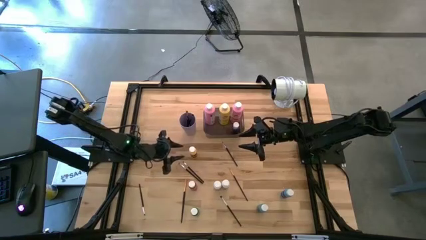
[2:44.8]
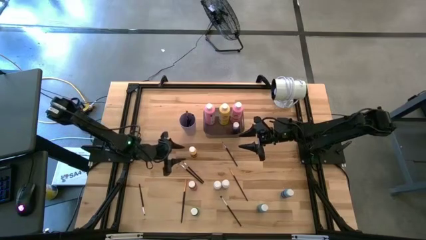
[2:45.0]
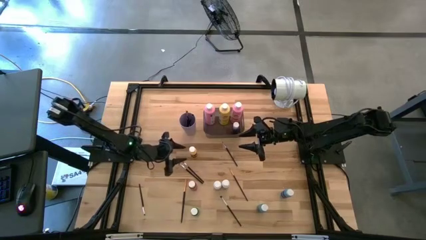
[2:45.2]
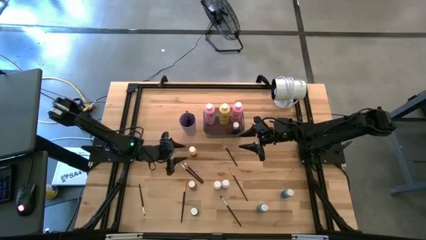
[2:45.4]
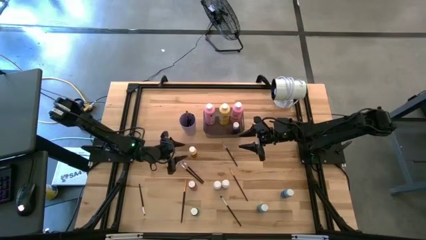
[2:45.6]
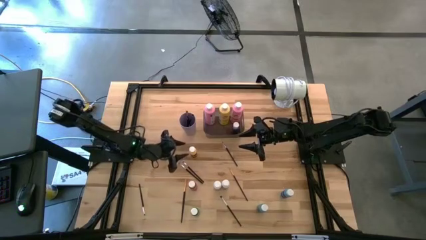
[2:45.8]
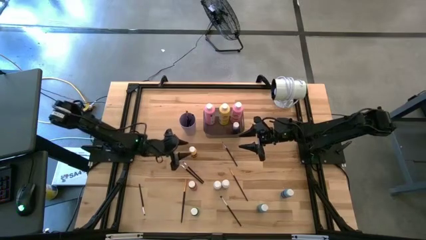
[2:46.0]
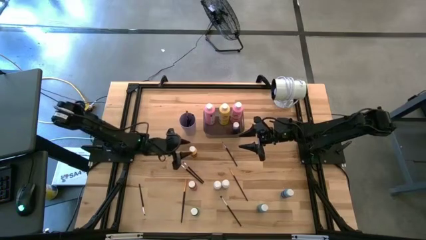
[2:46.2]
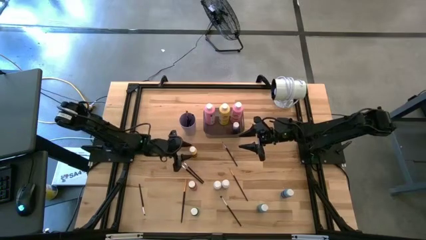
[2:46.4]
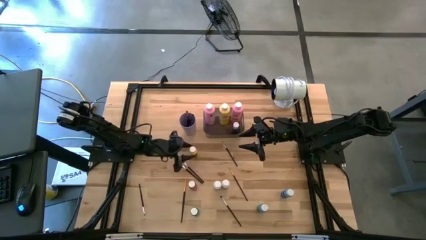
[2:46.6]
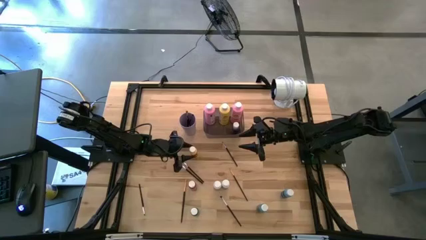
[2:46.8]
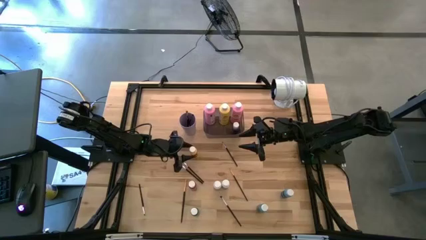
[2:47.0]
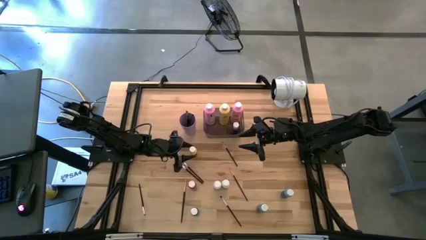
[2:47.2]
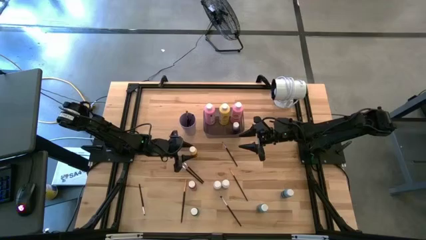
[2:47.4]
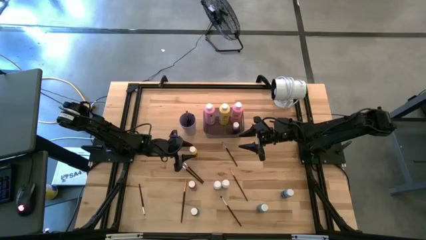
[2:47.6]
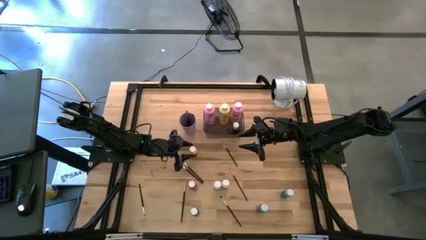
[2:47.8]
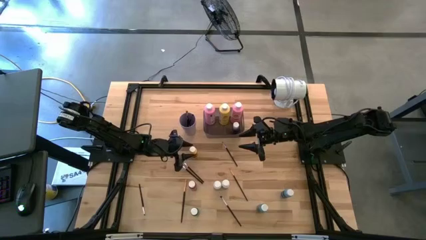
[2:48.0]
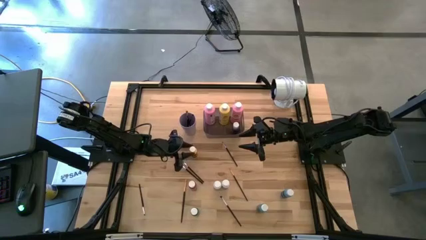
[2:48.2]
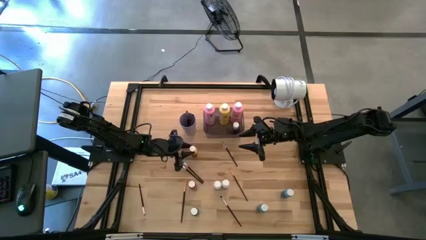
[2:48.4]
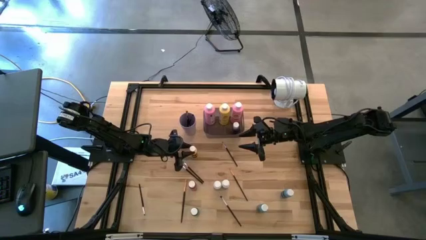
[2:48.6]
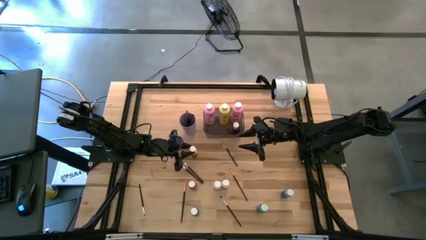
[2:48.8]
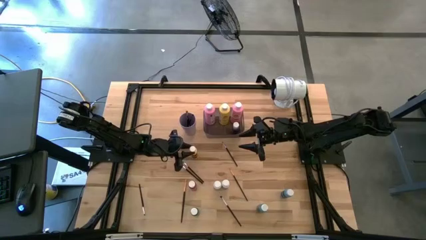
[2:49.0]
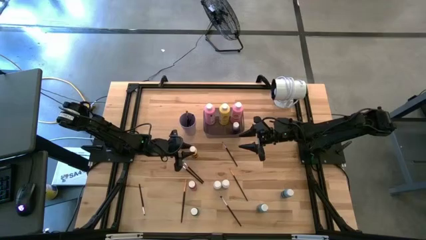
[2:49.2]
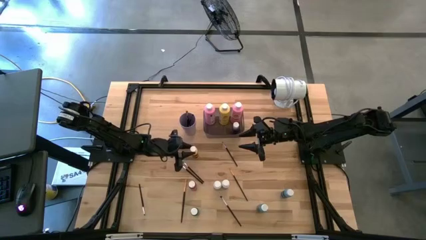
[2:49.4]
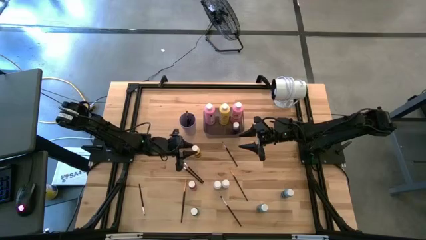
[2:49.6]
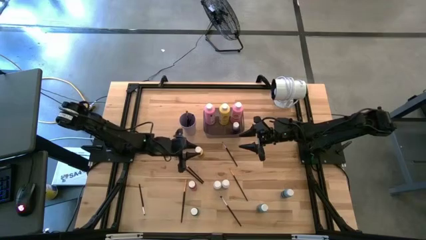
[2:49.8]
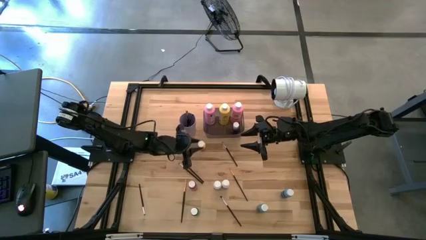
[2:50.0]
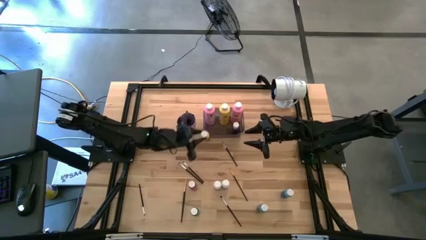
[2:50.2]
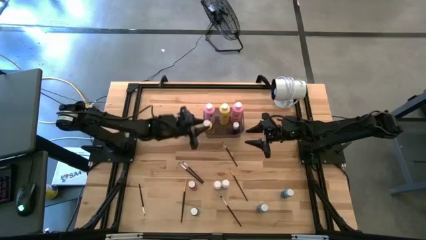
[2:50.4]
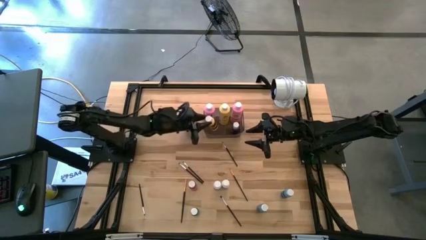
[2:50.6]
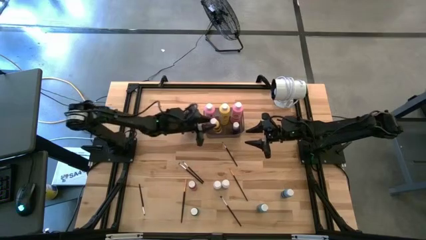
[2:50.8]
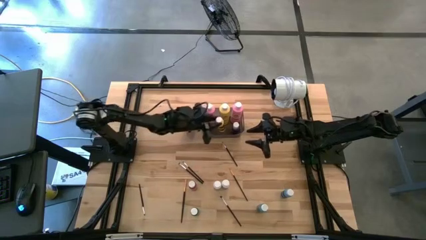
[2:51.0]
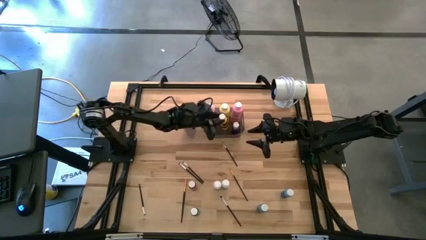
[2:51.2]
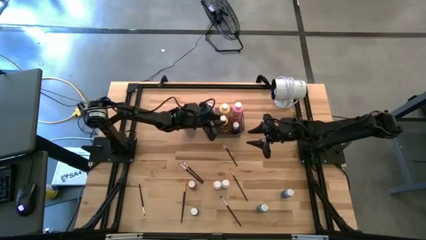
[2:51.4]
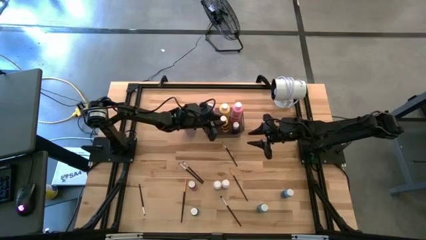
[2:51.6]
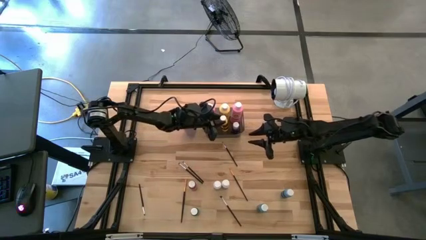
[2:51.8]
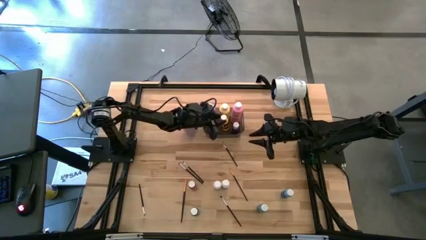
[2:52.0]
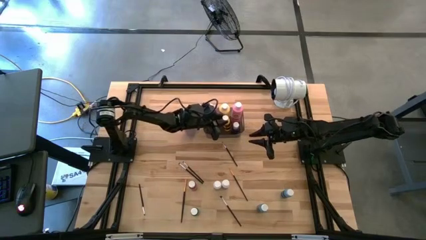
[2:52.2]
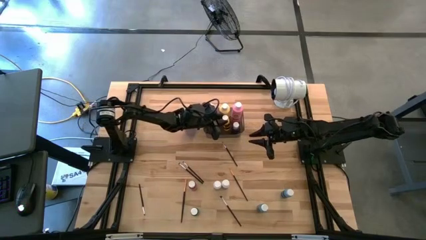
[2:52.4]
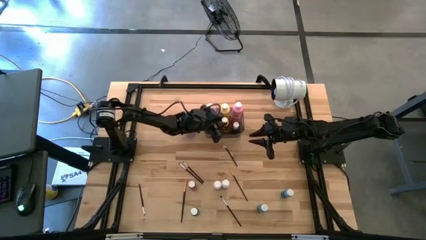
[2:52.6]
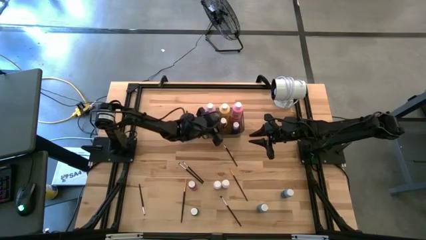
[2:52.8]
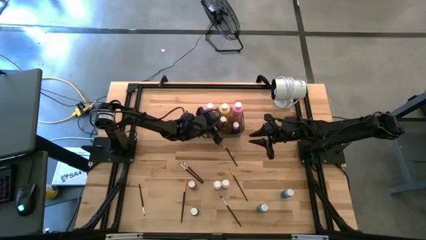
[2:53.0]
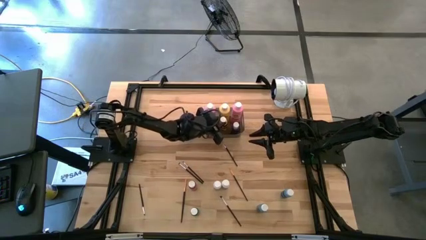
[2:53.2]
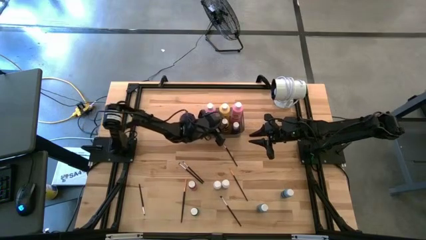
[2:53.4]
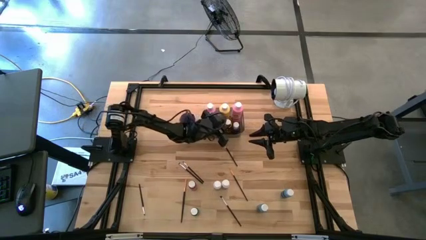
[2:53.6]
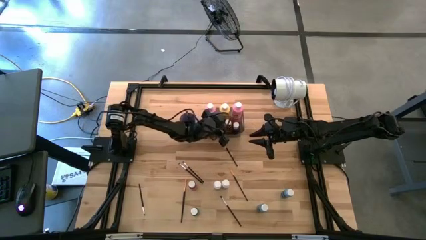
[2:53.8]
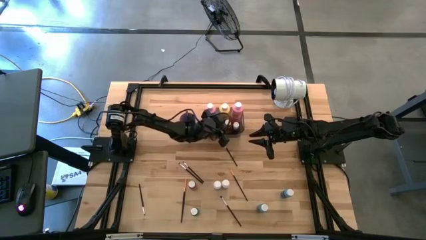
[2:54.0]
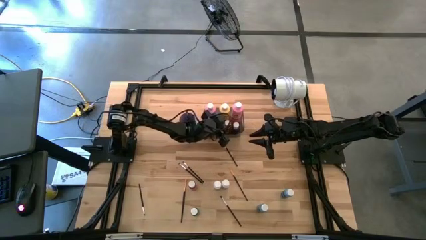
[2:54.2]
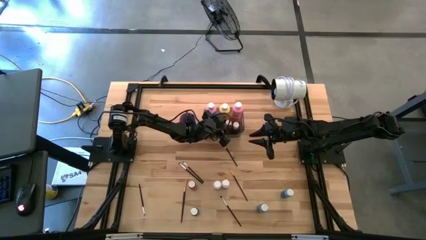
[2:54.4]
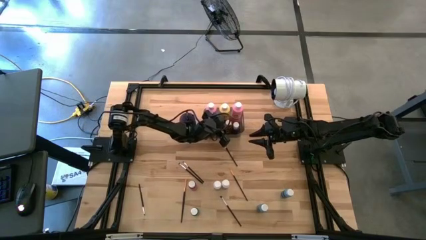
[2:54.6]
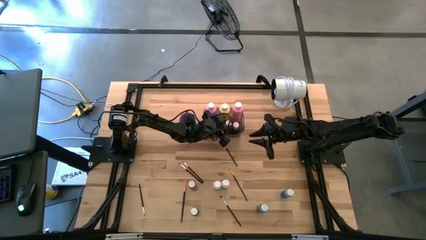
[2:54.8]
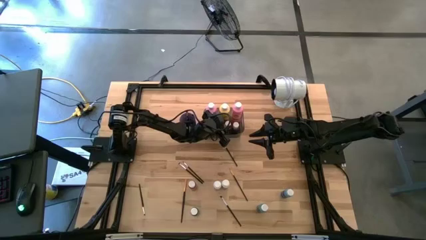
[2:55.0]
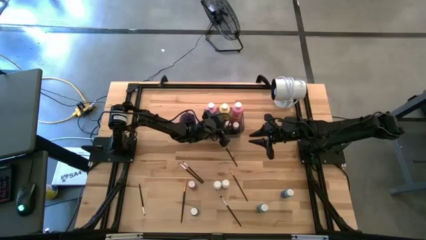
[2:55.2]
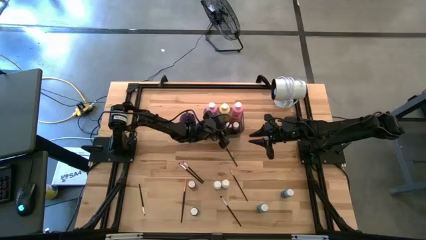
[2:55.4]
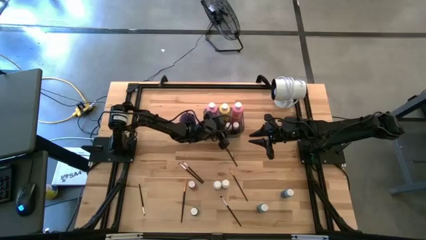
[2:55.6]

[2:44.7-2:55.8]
Task: Pick & Place Paint Supplies
Put the small yellow paint bottle into the gray bin

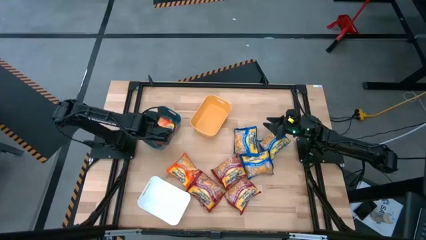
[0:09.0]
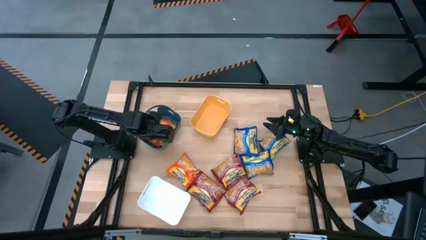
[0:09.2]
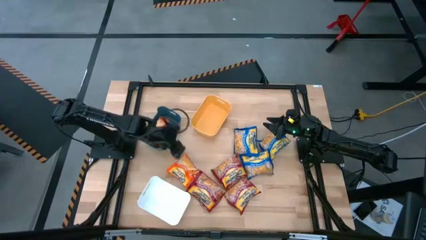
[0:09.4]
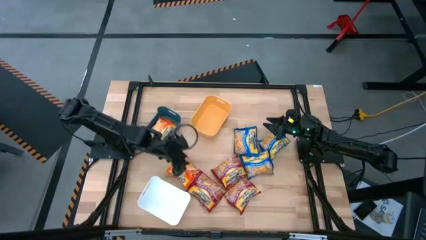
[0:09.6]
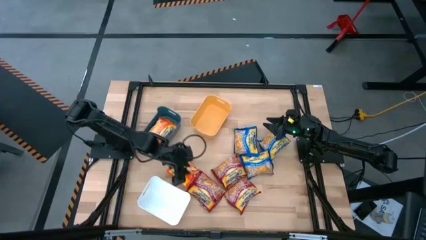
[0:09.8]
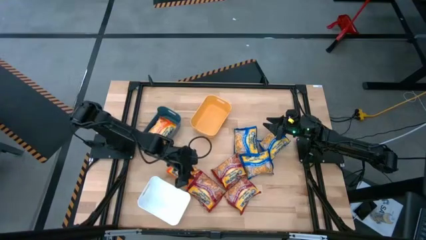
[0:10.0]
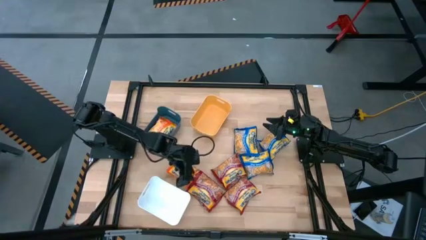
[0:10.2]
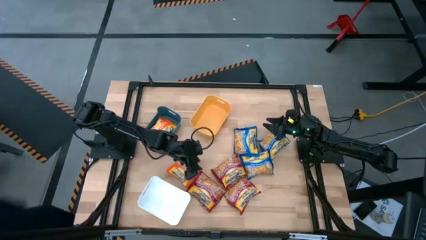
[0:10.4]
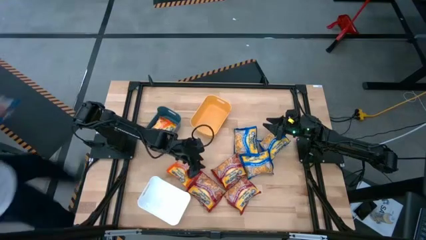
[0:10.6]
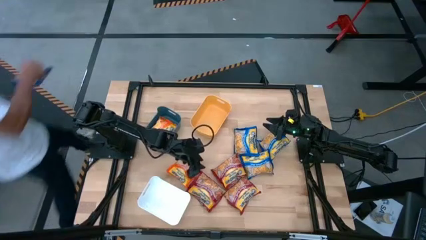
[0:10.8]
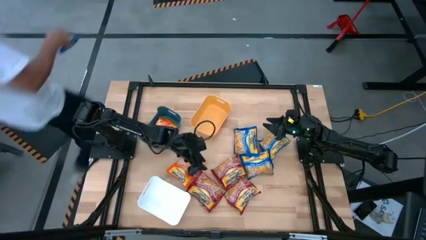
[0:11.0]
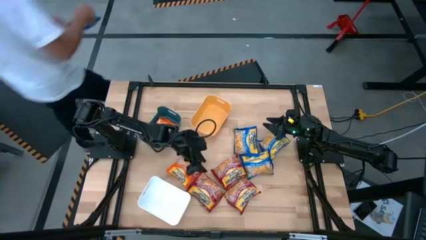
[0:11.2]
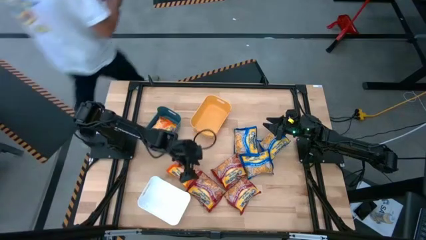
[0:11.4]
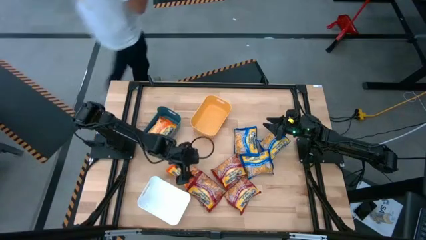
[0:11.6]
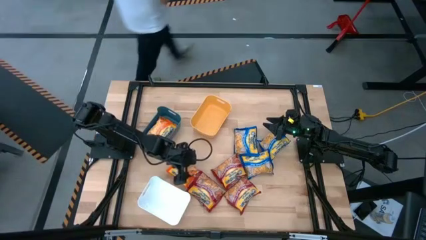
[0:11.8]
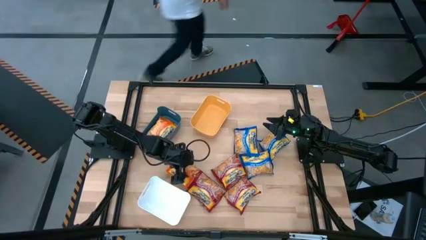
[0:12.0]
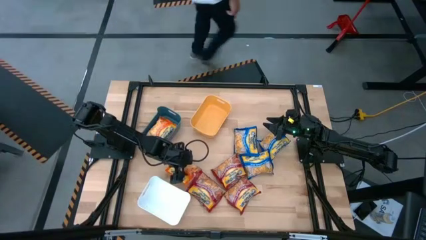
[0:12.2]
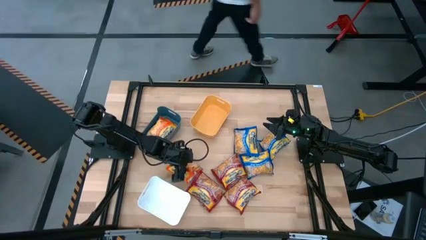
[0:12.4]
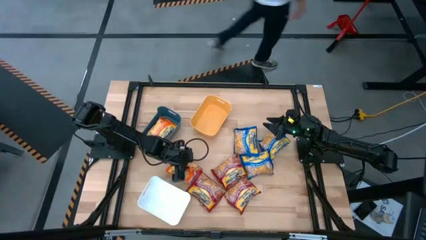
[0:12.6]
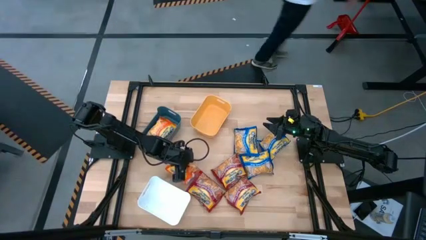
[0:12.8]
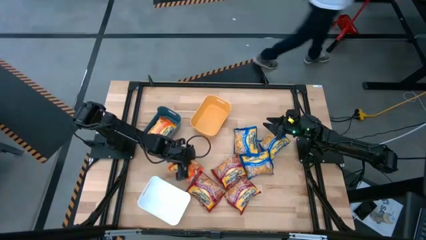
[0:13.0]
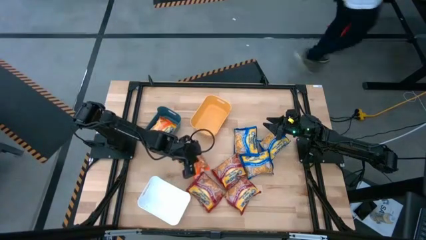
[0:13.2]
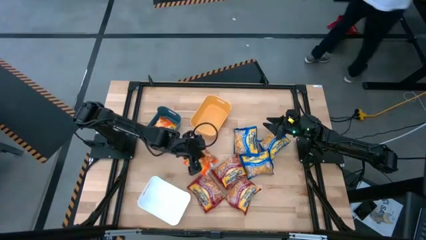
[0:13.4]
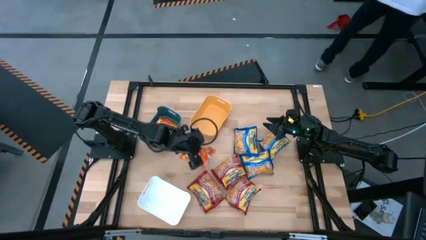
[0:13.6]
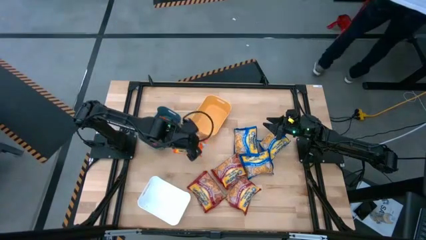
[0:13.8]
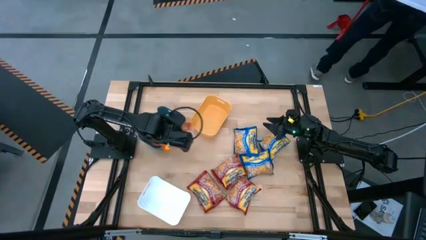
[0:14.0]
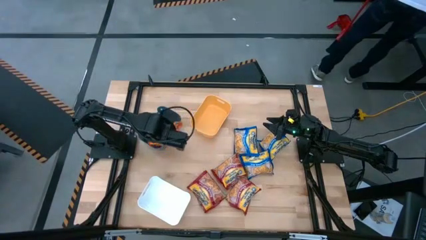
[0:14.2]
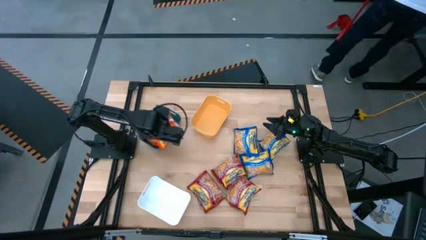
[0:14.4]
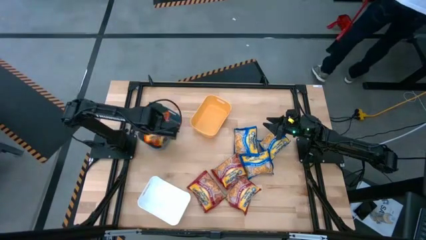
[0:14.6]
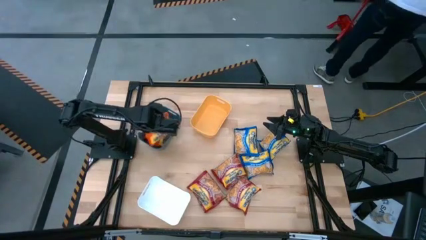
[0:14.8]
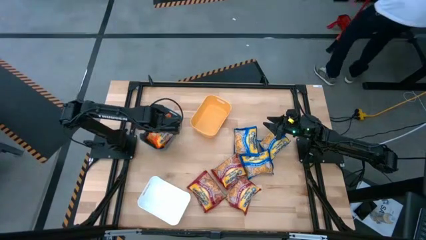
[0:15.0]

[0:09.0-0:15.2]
Task: Sort Maruchan noodles
Put the orange noodle pack into the blue bin
